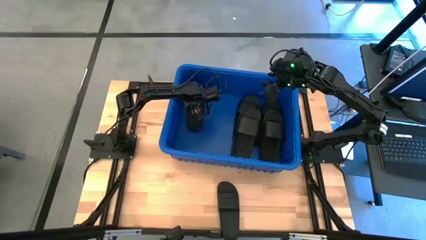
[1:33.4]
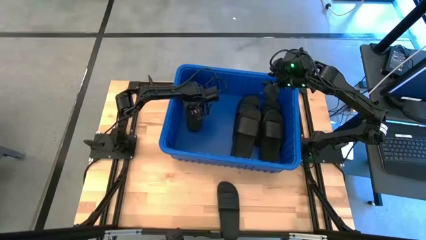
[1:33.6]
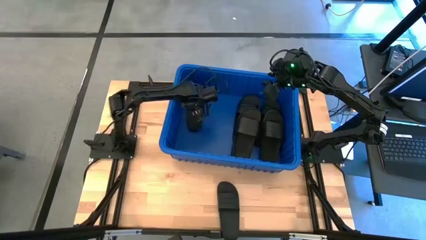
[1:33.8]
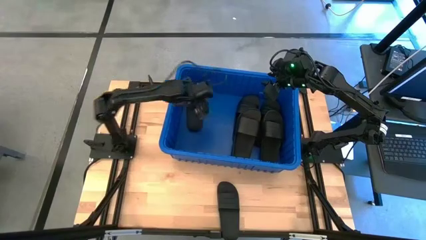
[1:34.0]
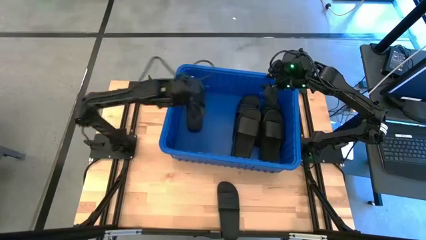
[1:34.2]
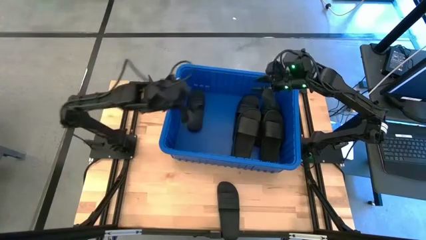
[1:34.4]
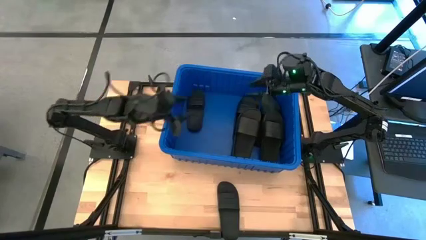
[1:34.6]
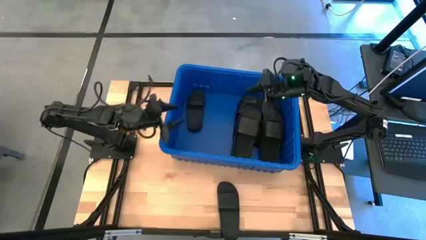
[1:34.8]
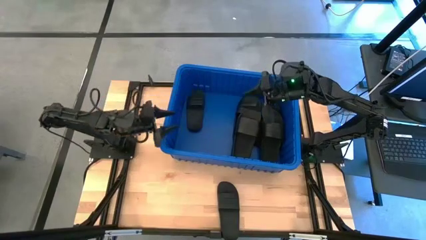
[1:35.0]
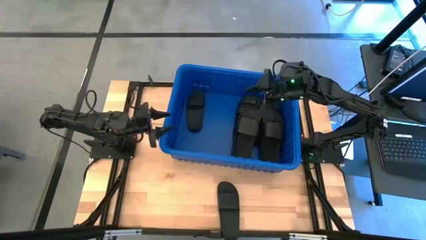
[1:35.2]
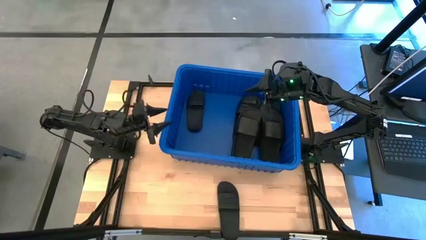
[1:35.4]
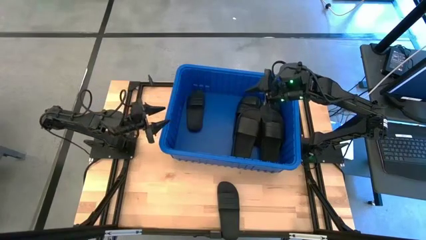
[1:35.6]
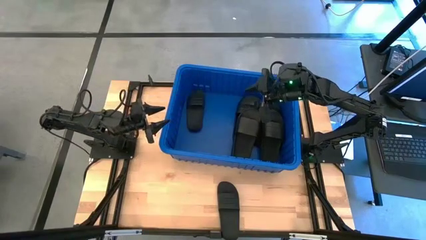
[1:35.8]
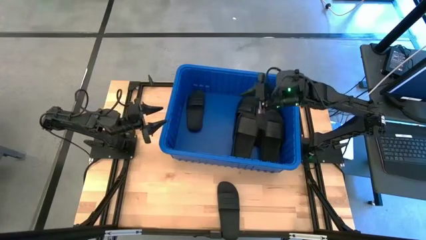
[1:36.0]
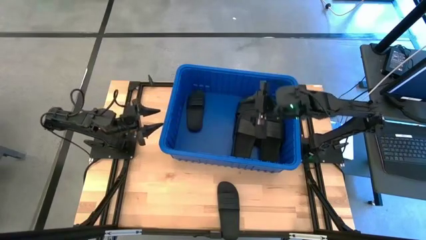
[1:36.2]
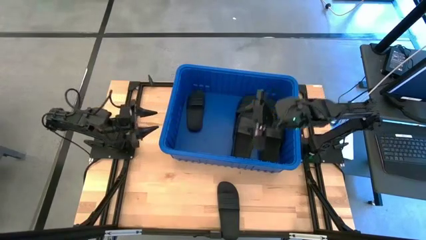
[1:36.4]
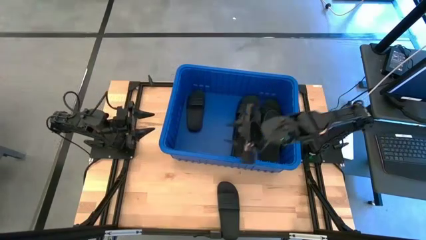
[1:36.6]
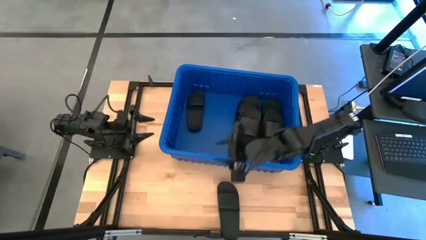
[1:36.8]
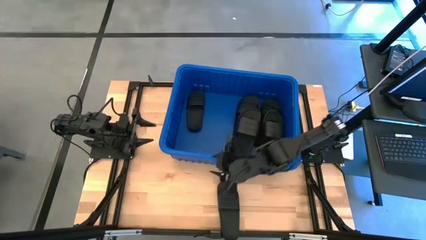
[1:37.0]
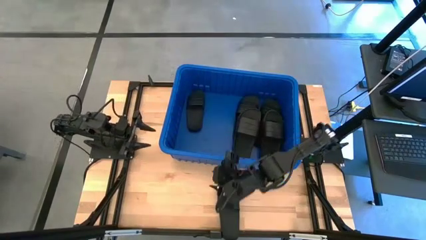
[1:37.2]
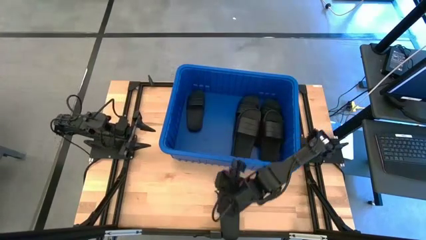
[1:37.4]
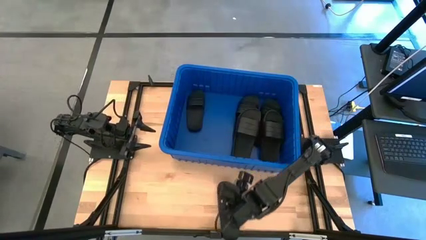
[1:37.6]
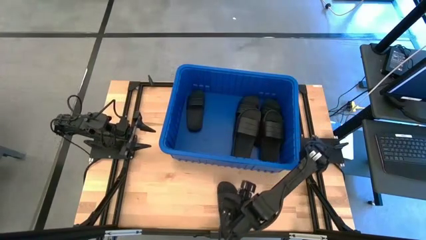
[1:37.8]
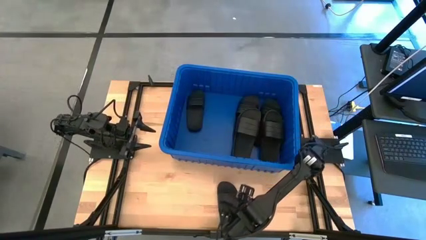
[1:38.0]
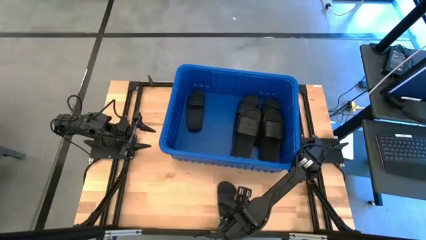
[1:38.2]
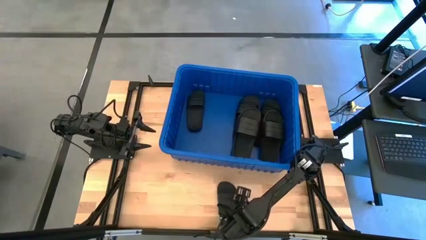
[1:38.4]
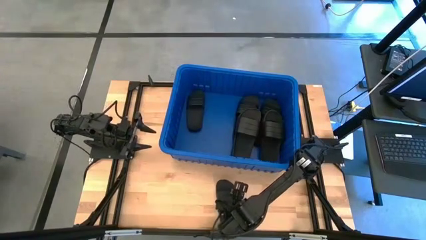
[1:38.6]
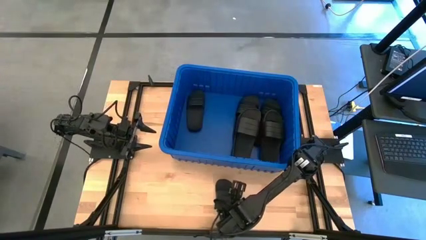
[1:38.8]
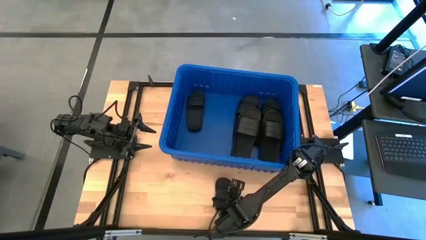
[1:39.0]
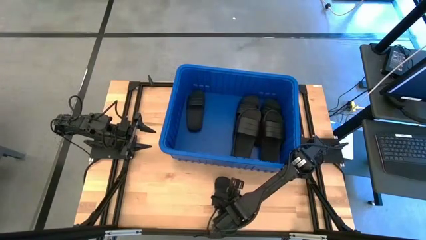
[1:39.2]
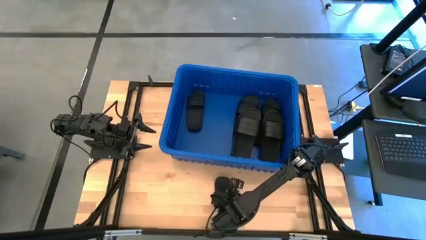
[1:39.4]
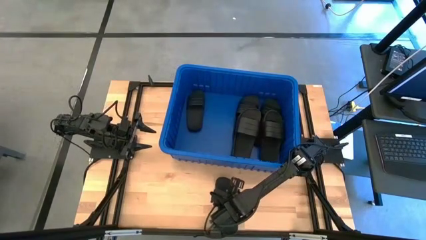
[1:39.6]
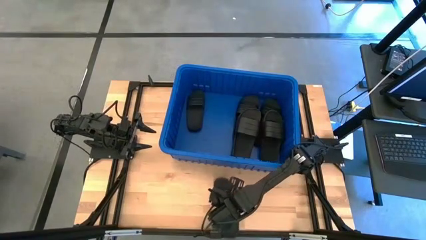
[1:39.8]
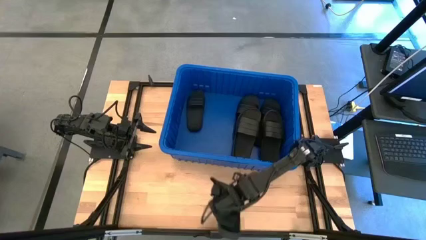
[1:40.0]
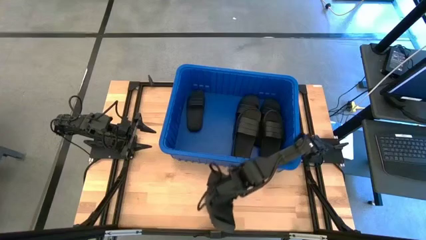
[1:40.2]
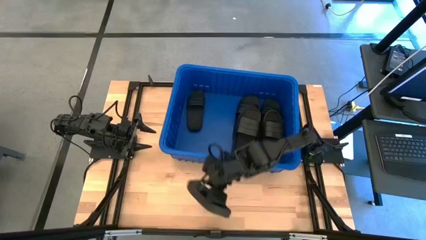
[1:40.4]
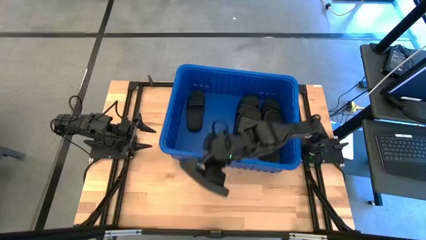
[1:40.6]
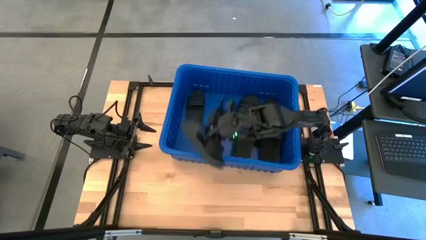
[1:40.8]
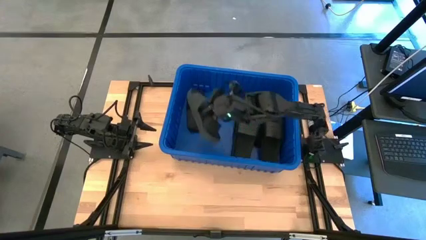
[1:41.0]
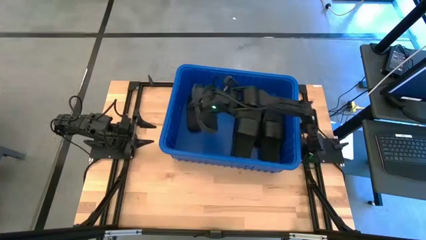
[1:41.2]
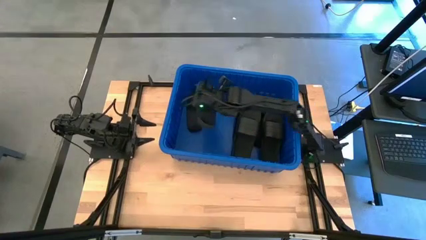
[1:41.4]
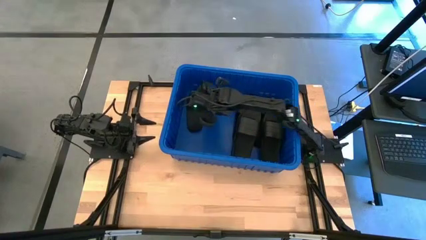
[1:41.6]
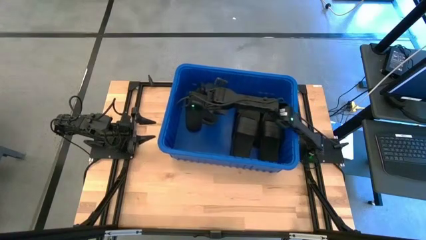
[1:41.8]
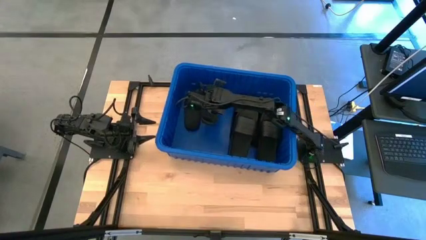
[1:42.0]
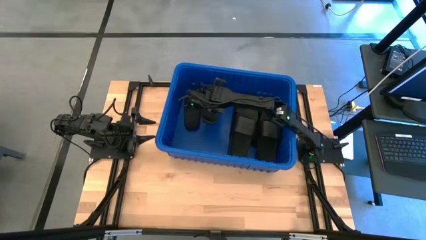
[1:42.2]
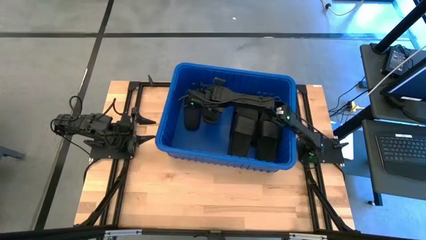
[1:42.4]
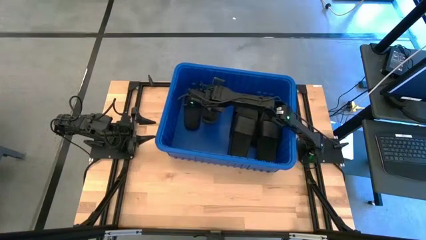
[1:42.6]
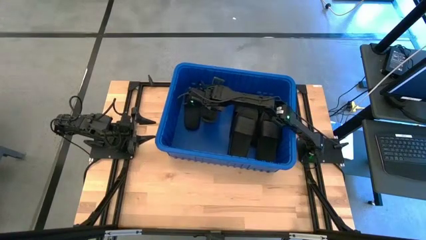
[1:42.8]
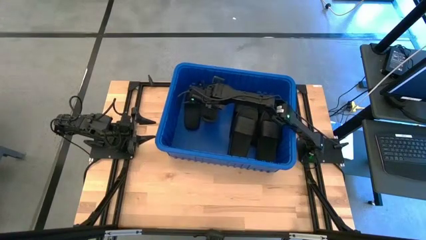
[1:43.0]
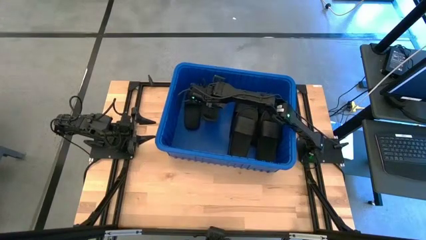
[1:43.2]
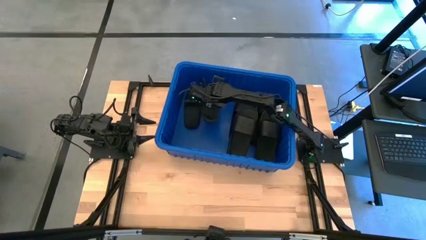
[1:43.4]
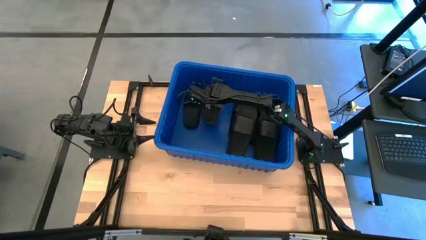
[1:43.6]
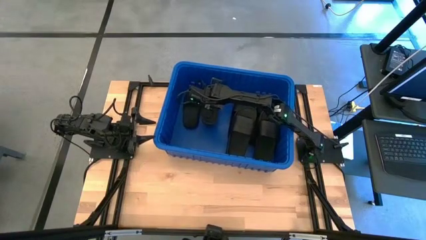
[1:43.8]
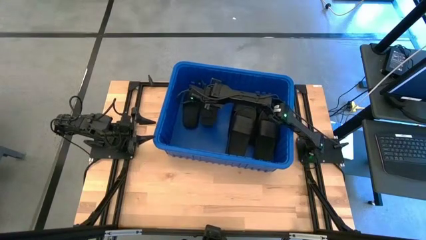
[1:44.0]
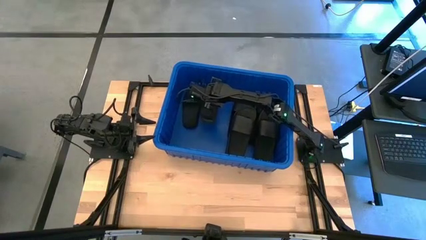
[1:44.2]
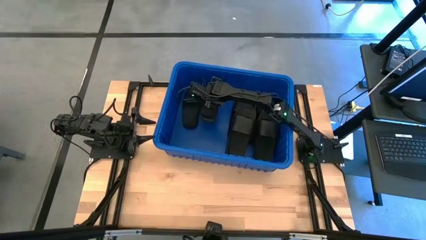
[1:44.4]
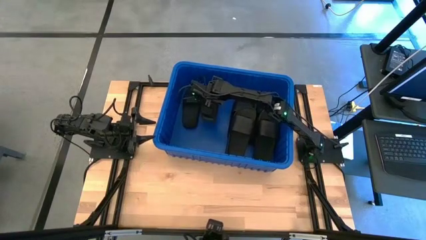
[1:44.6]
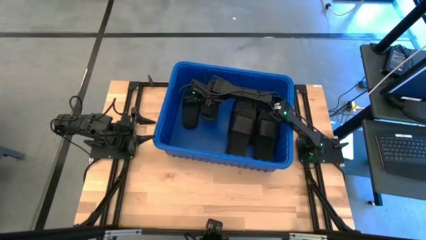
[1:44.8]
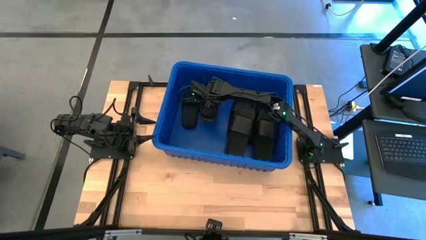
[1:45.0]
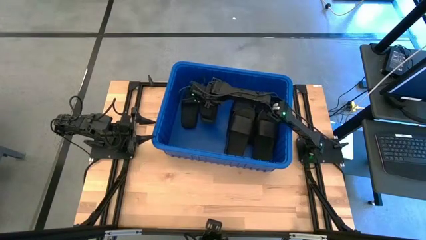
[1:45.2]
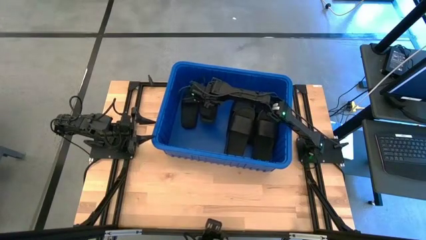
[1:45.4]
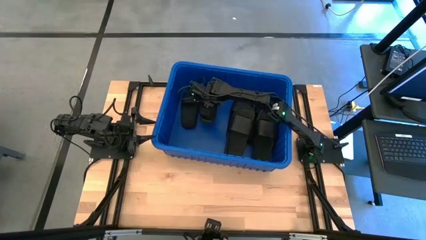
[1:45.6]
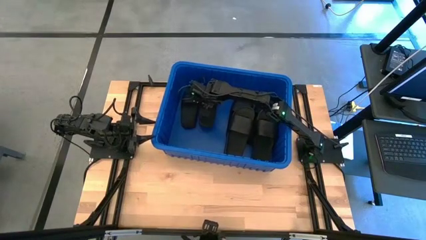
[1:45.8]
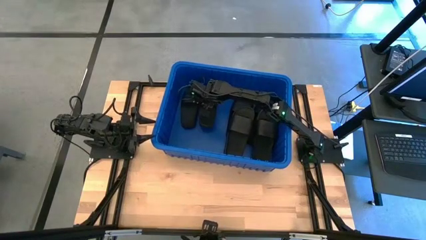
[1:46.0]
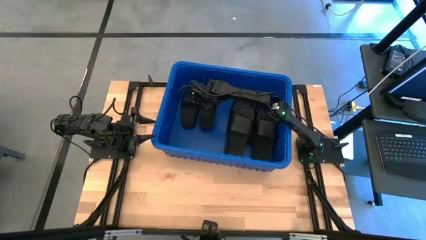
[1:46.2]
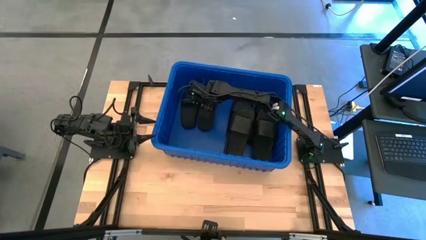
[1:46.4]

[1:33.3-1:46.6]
Task: Pick and place slides into bin
Put the black slides into the blue organizer bin
